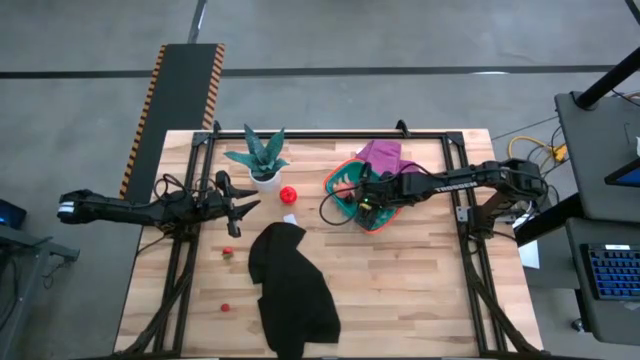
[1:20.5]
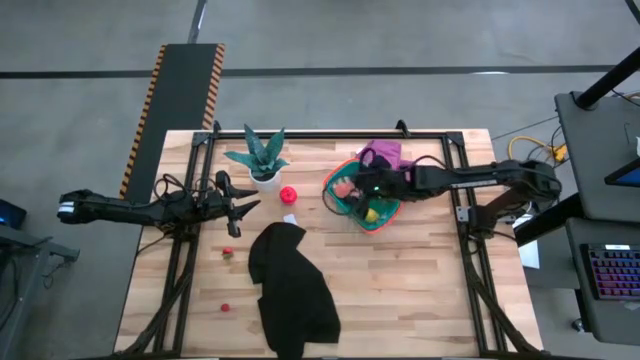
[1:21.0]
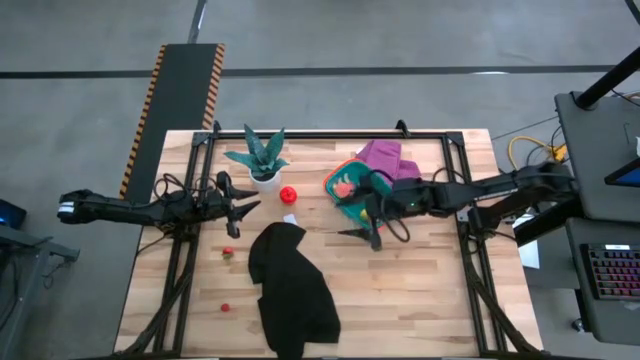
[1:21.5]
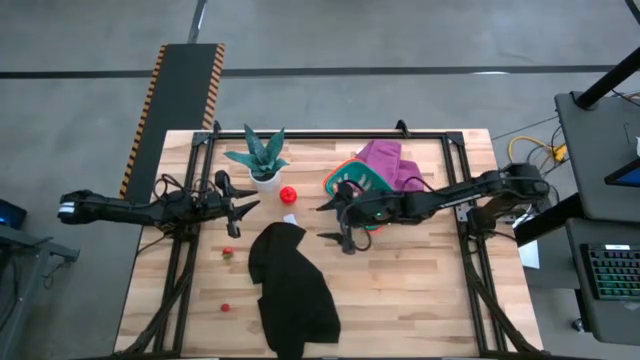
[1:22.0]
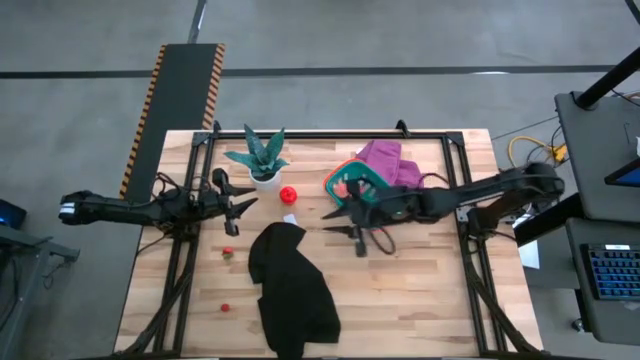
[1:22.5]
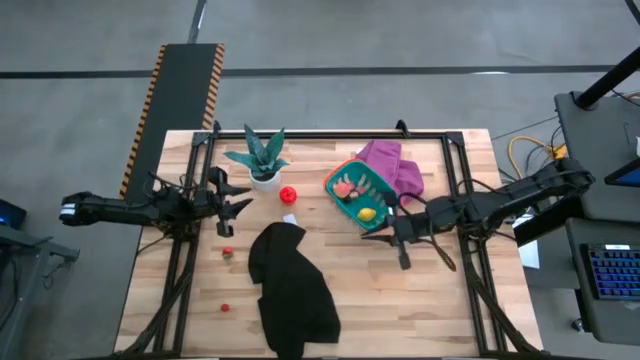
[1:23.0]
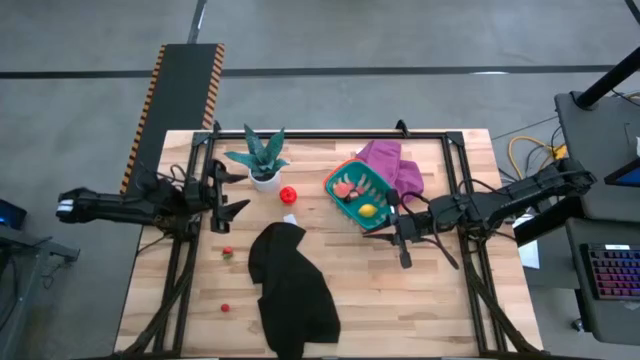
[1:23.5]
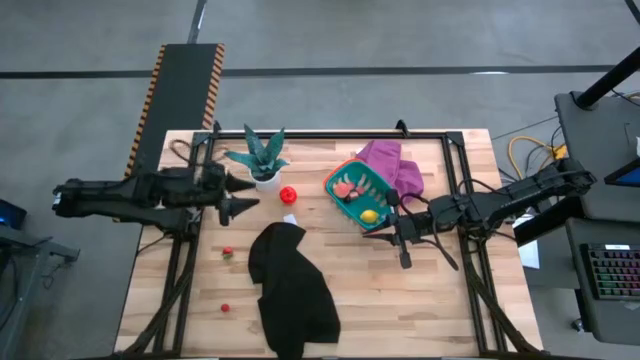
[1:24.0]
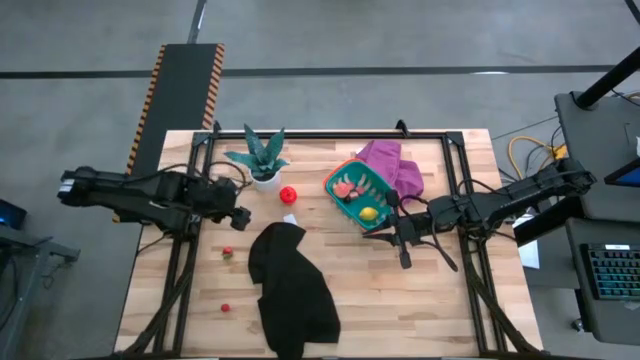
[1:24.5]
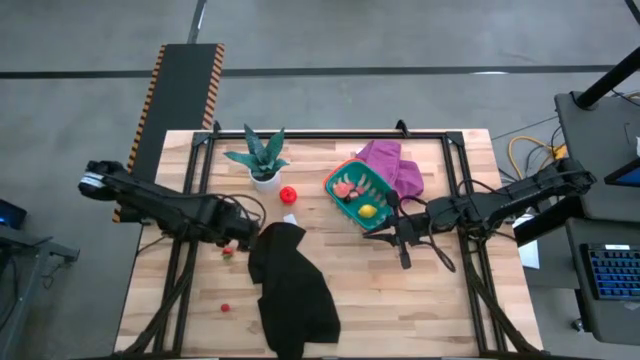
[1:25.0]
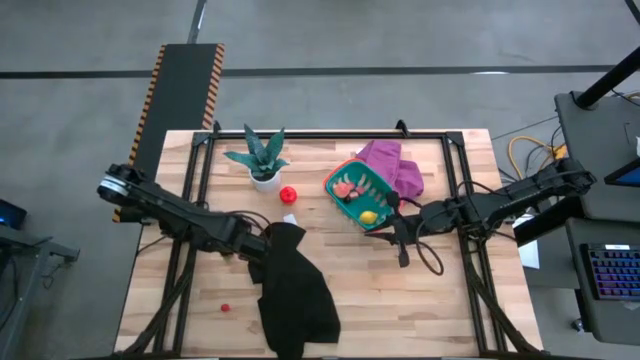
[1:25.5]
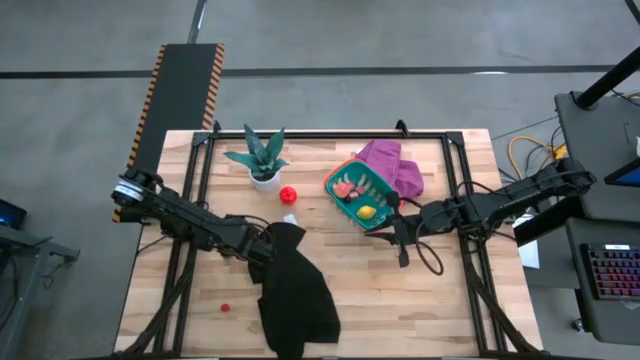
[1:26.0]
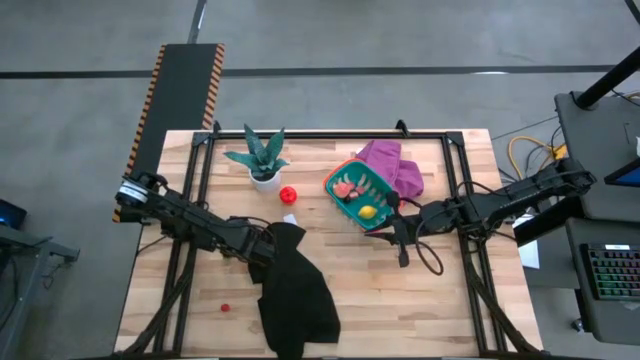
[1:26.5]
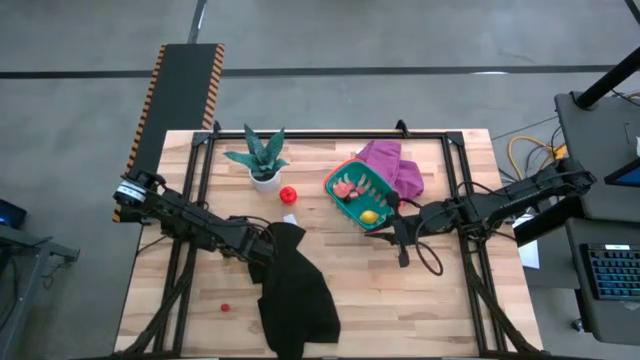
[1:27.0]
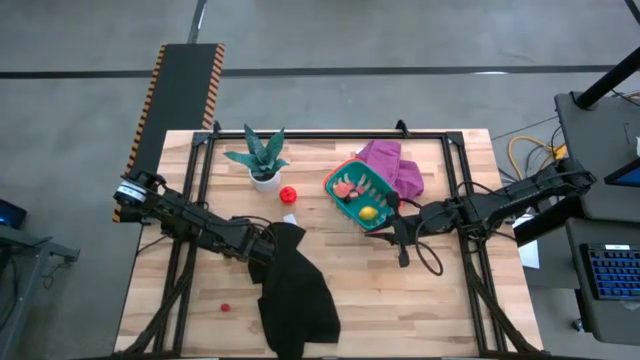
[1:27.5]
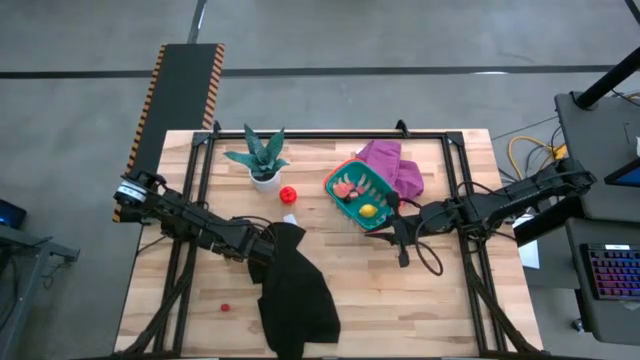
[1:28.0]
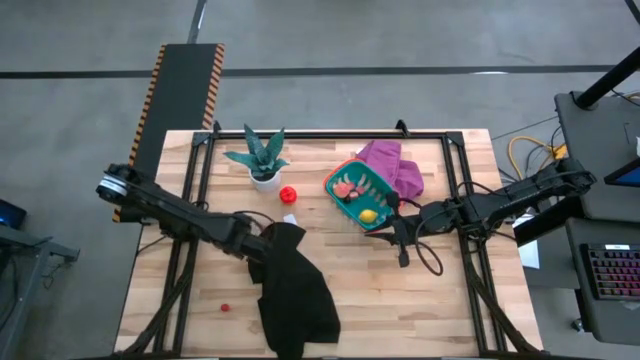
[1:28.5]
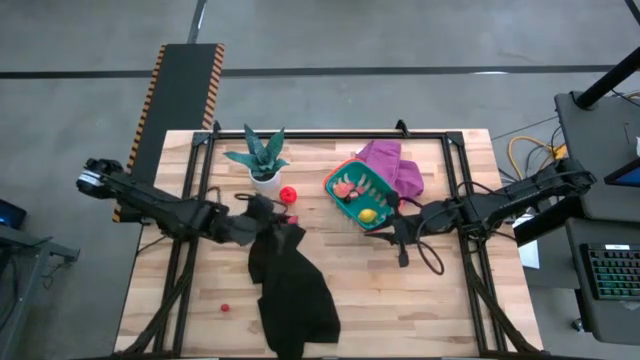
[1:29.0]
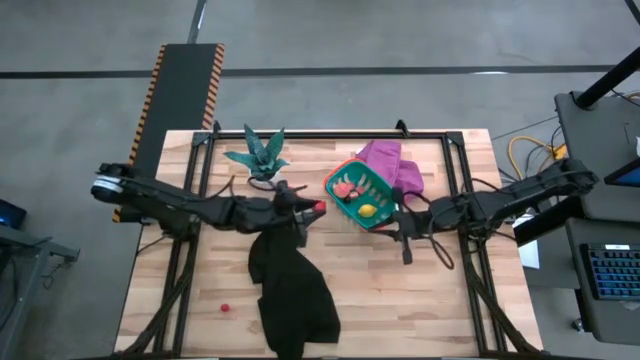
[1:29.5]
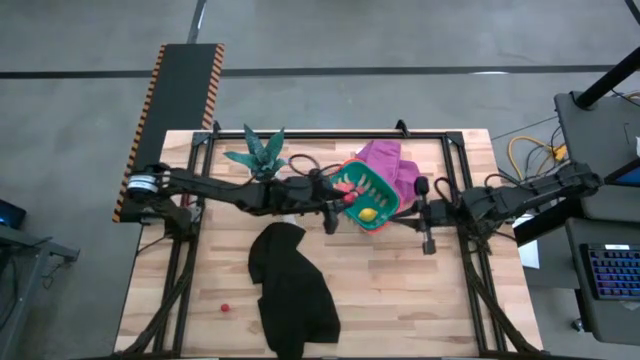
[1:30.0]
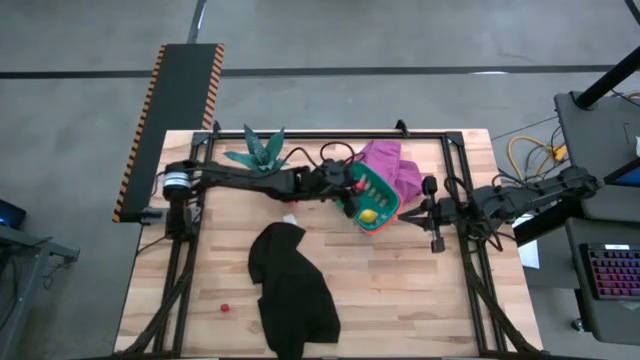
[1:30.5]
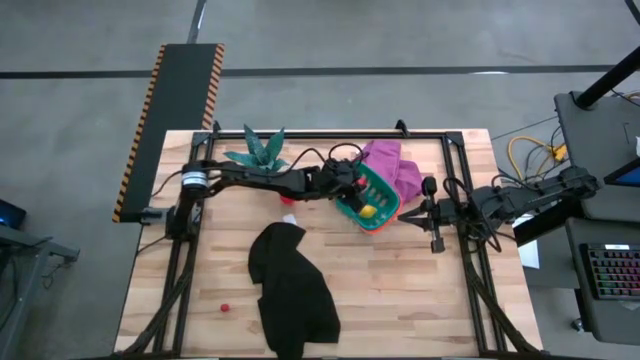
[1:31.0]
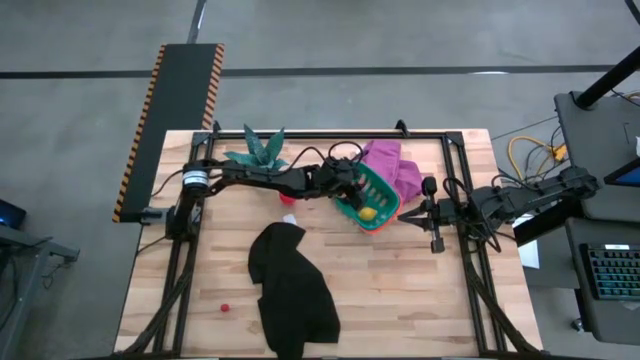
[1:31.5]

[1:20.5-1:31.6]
Task: Pick and placing Produce into tupperware
Put the strawberry into the green basket

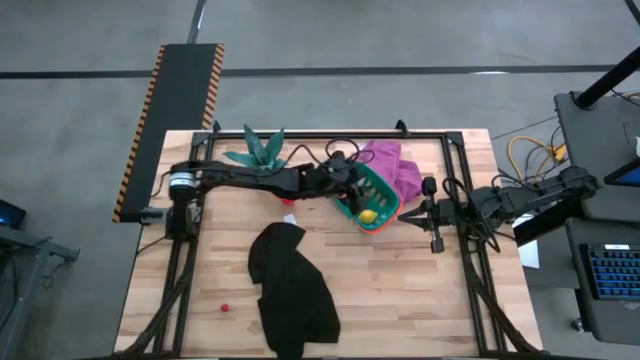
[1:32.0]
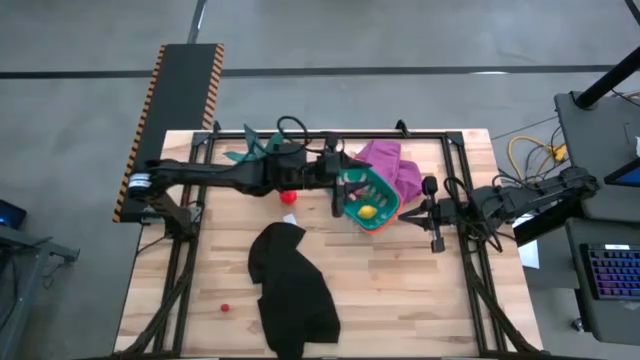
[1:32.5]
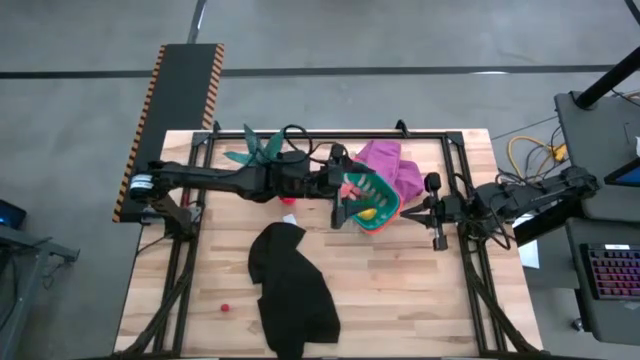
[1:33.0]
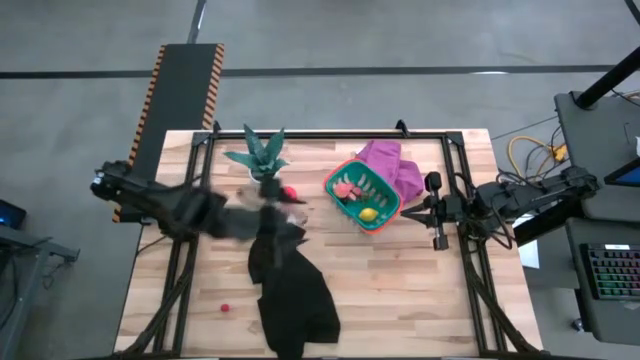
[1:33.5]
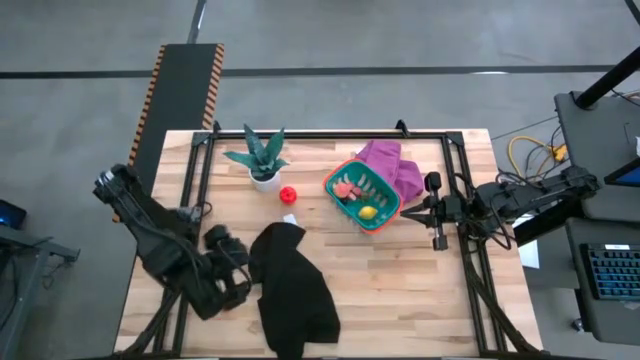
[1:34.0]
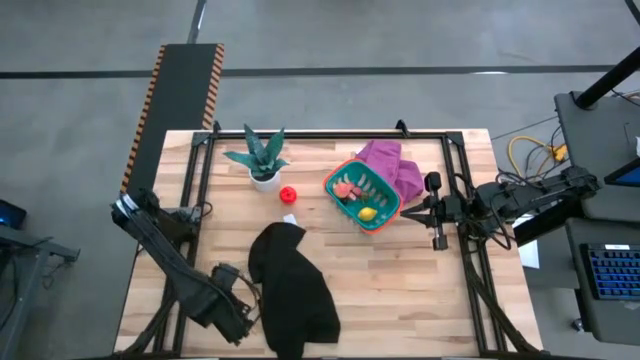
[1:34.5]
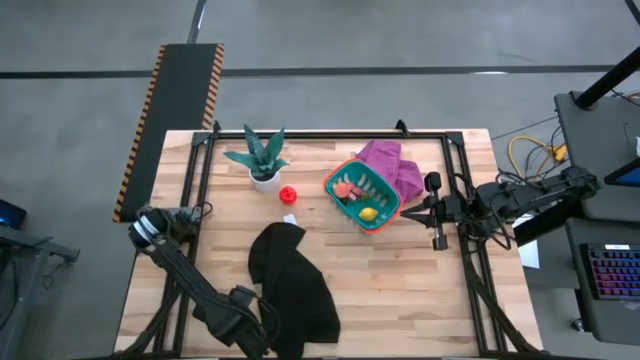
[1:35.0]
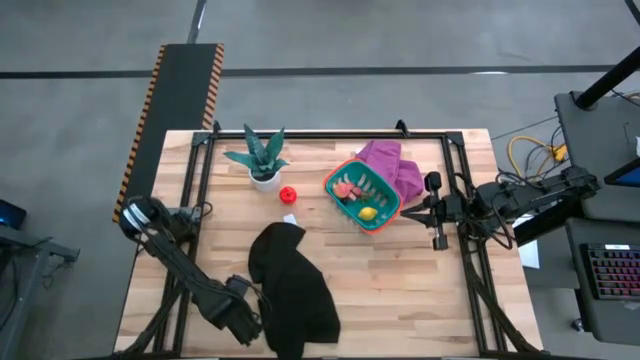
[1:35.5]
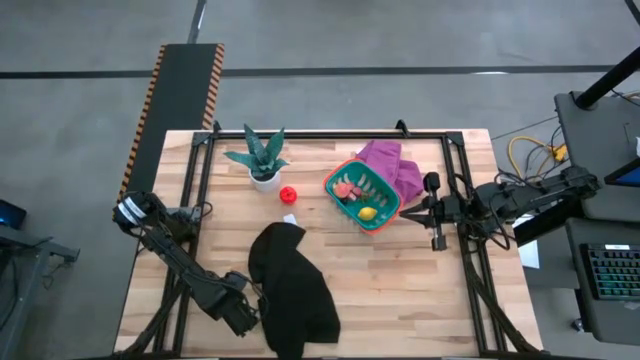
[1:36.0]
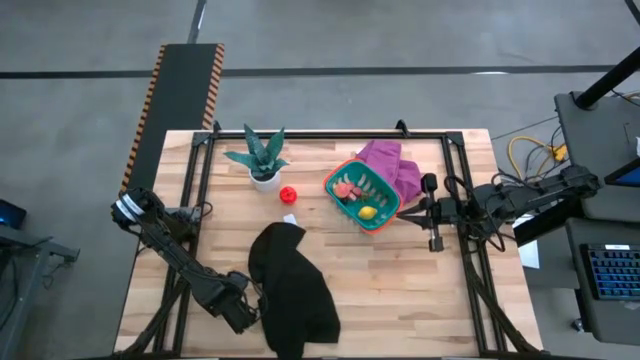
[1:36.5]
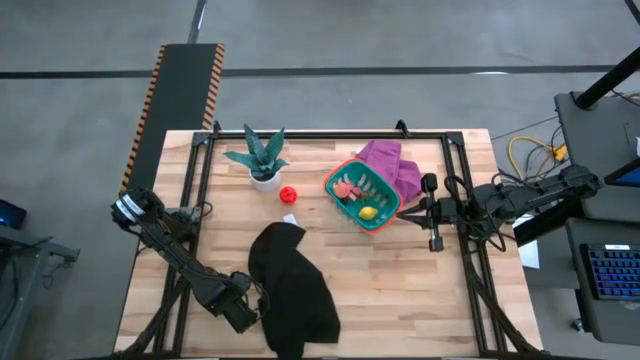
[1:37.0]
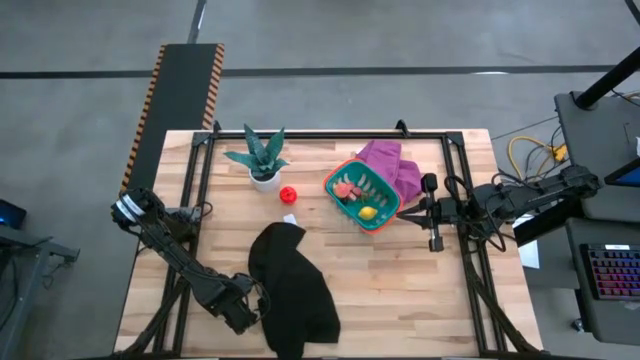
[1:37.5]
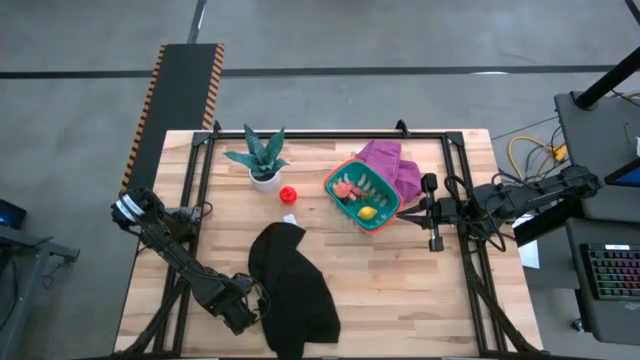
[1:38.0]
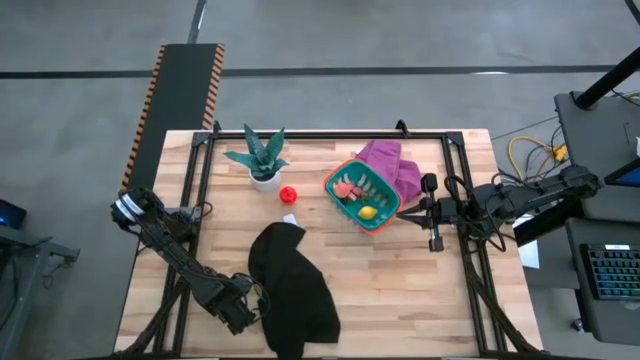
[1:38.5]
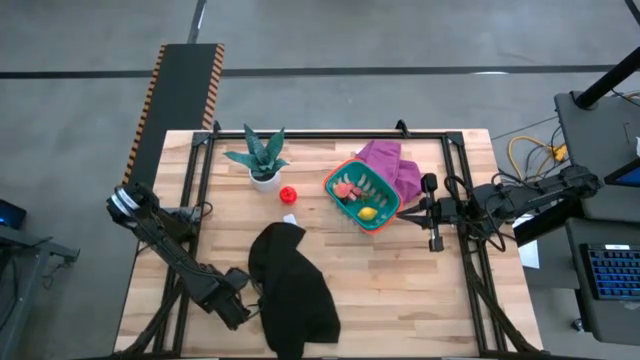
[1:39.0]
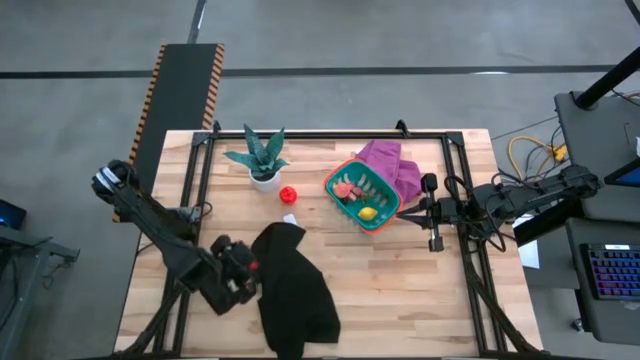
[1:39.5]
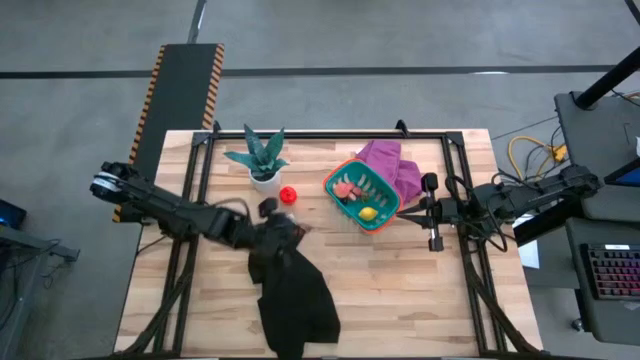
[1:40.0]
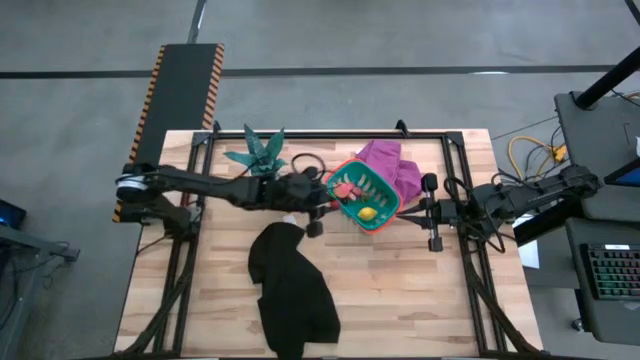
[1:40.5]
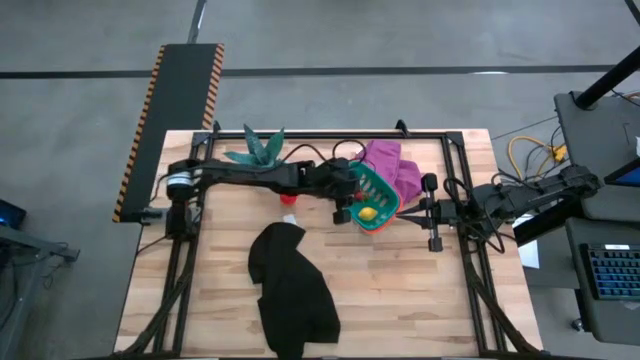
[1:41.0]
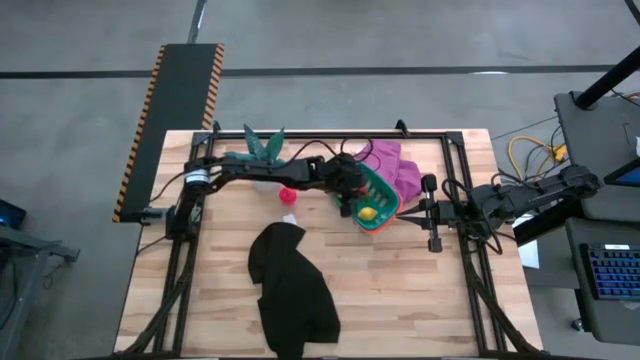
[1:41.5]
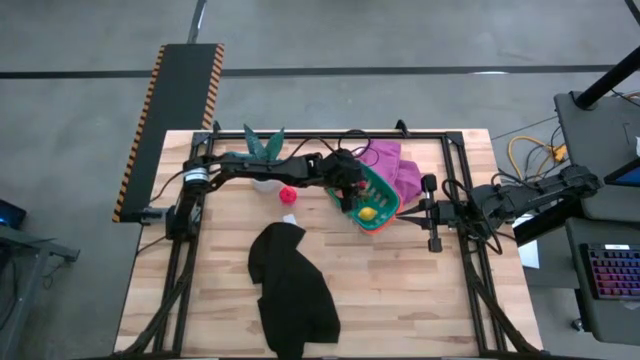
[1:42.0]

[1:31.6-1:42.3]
Put the raspberry into the green basket
